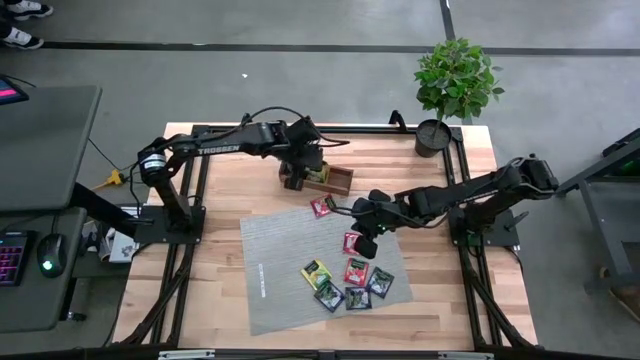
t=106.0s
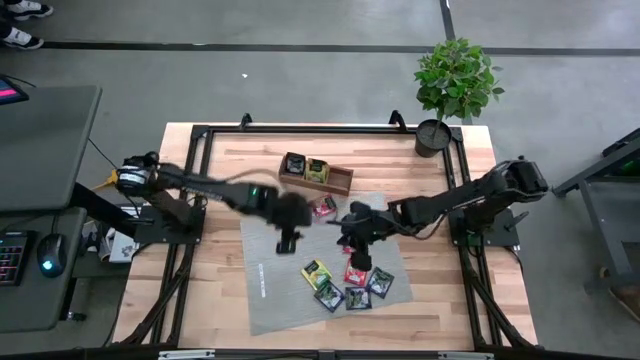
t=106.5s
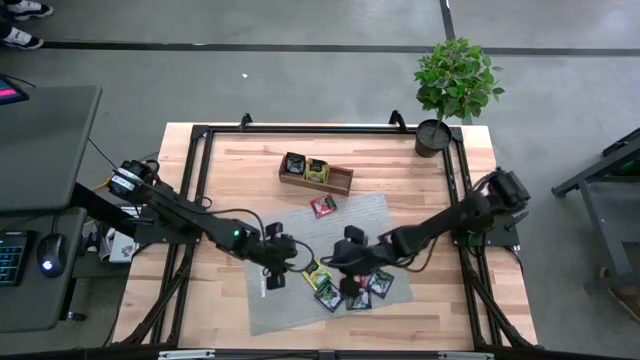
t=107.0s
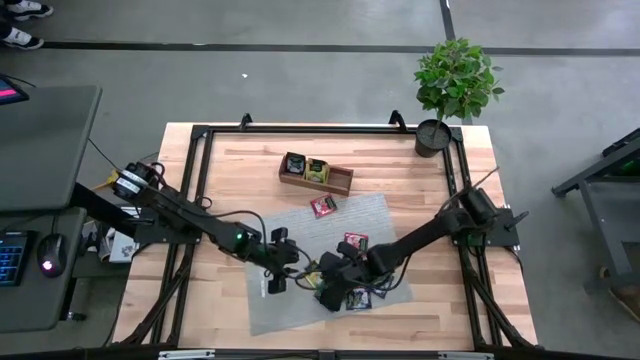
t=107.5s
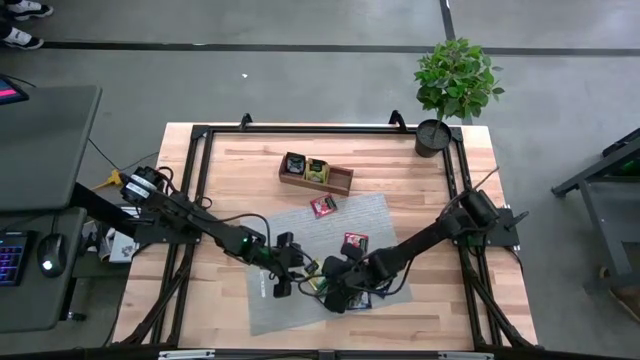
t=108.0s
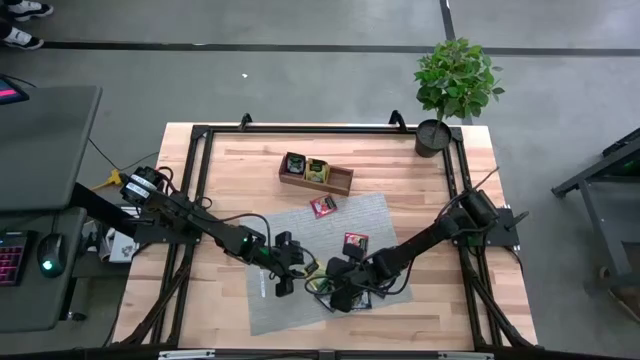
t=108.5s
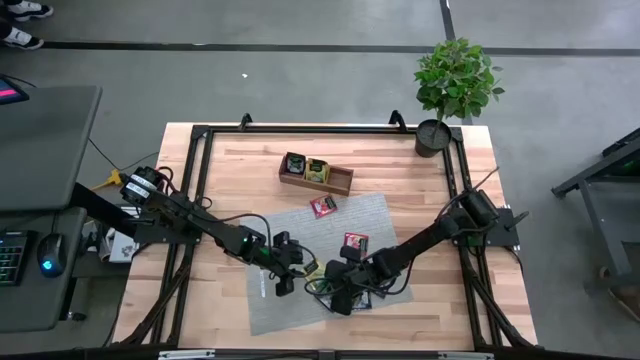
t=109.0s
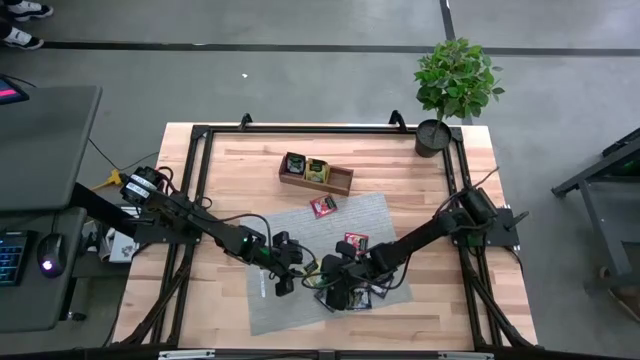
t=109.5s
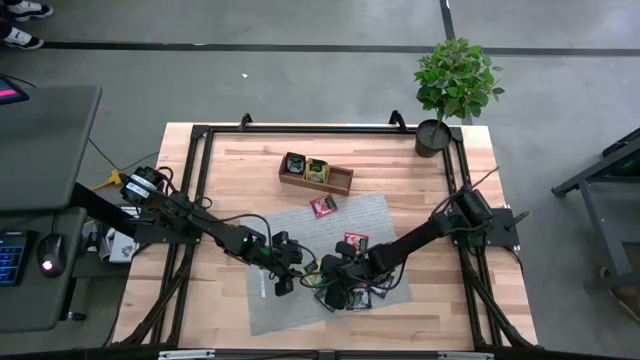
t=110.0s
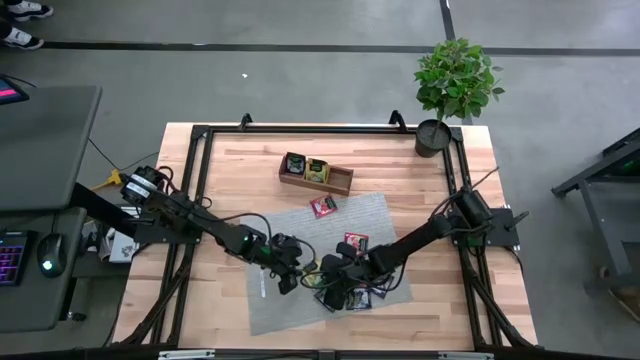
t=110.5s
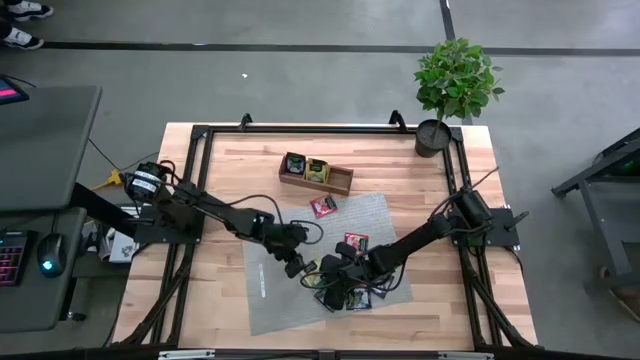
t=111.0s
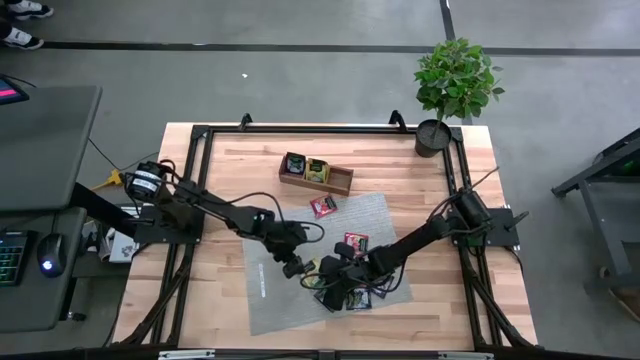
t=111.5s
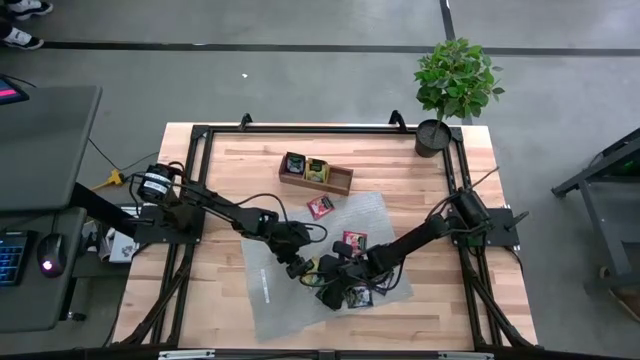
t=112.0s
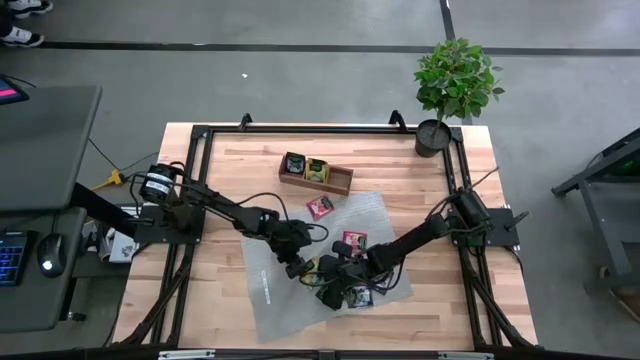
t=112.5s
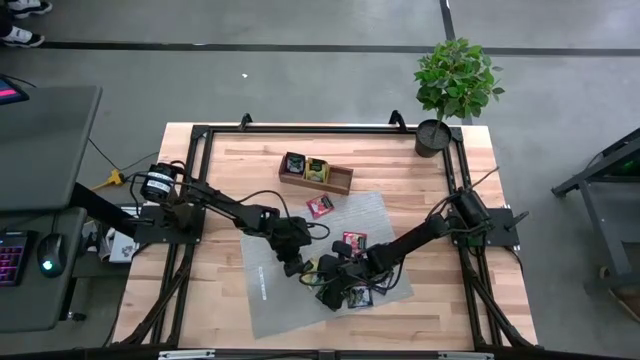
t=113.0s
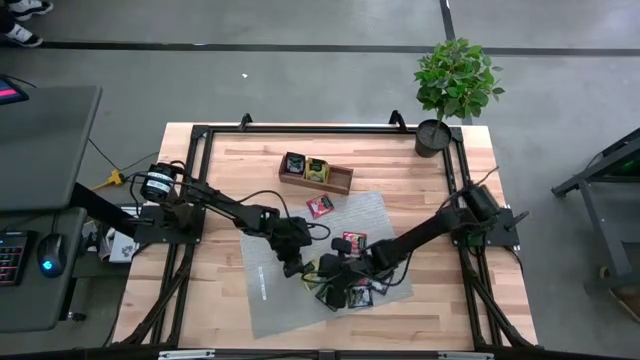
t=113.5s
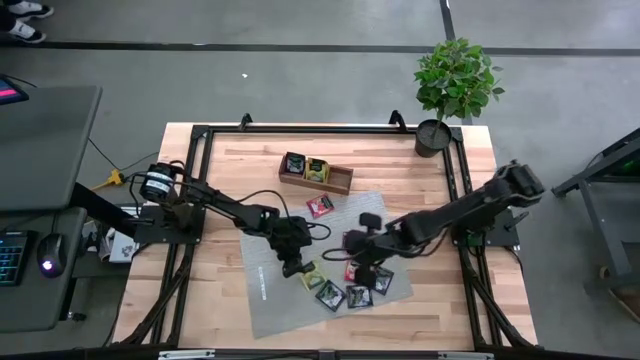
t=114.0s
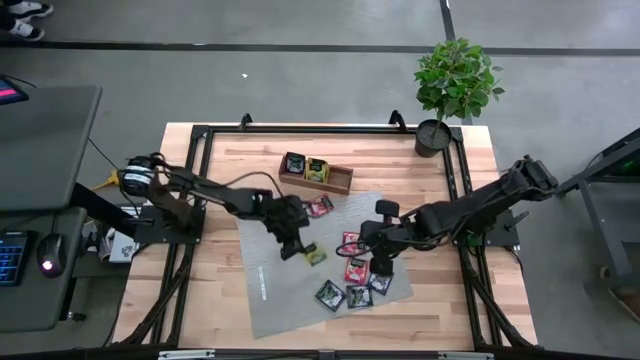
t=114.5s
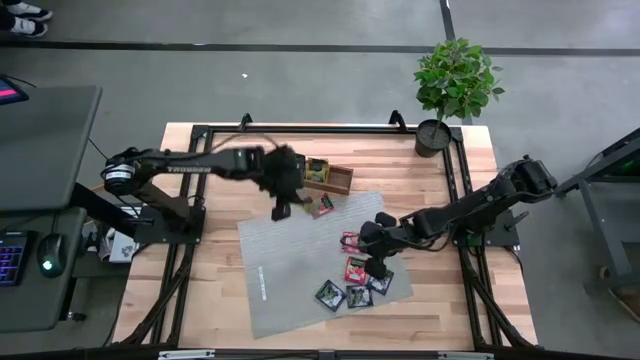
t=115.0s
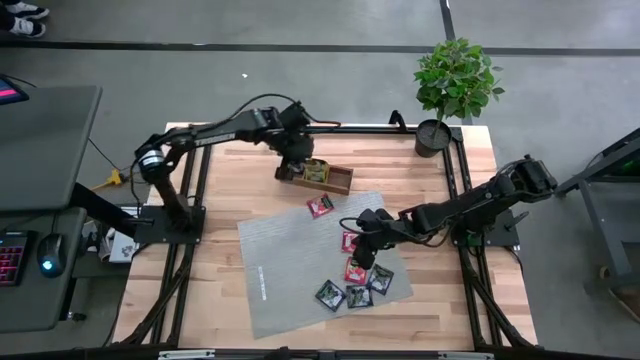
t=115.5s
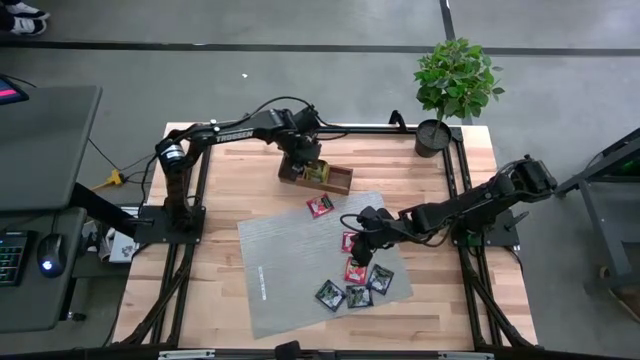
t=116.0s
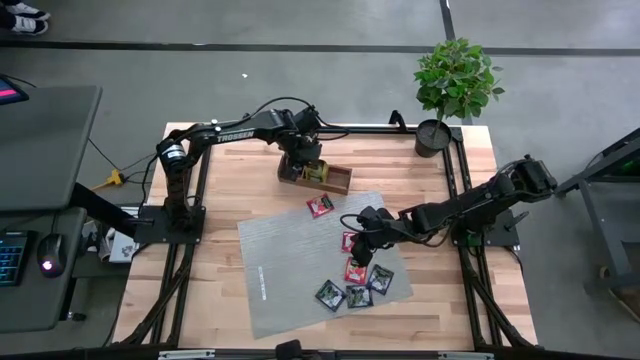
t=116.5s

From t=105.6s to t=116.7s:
Task: Pick & Place Tea
Put the yellow tea bag into the middle section of the wooden organizer

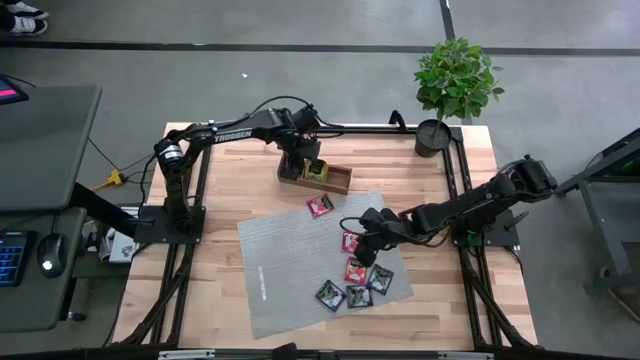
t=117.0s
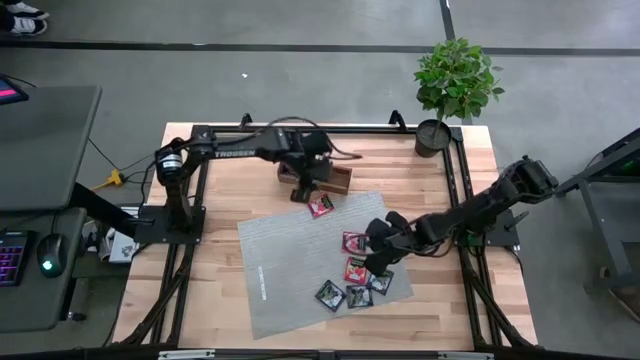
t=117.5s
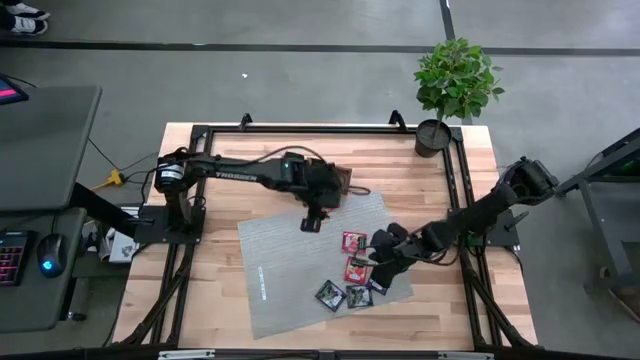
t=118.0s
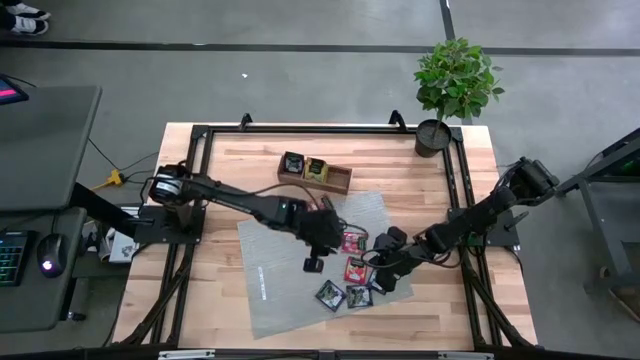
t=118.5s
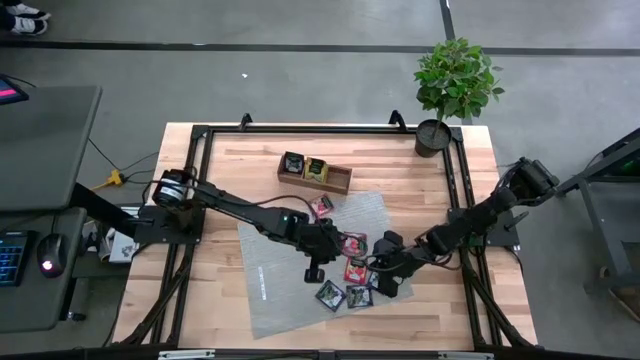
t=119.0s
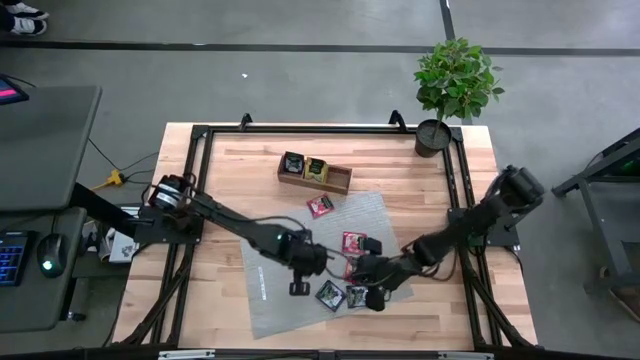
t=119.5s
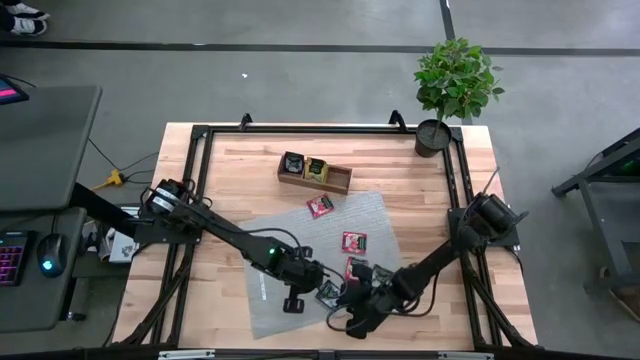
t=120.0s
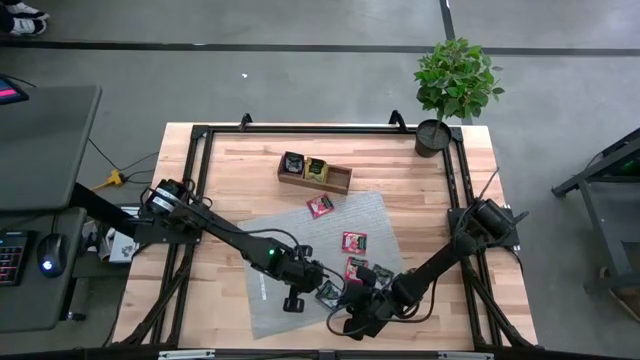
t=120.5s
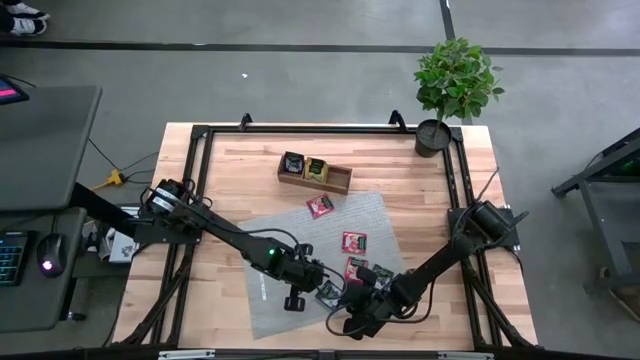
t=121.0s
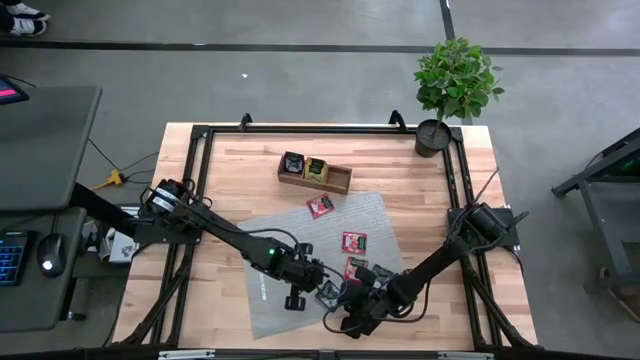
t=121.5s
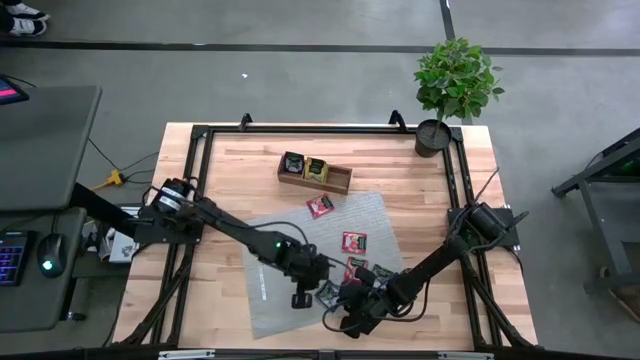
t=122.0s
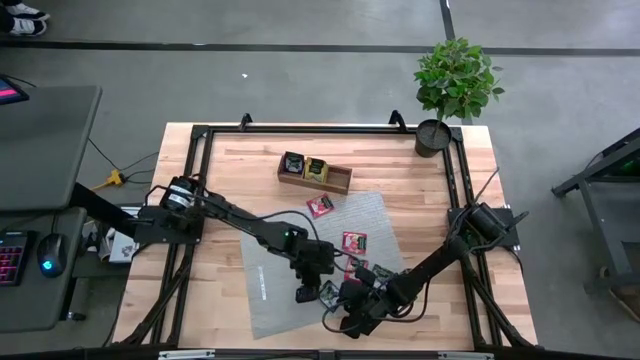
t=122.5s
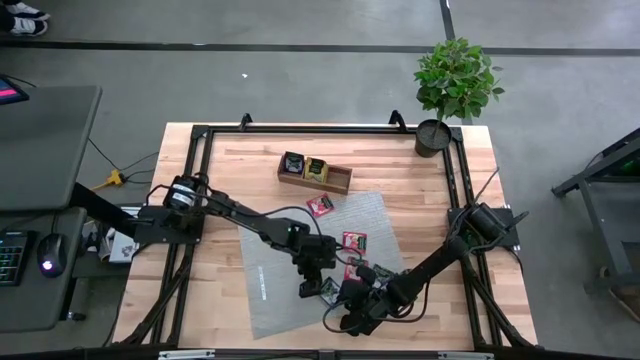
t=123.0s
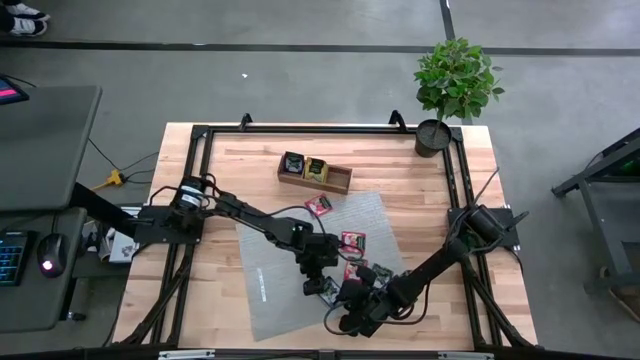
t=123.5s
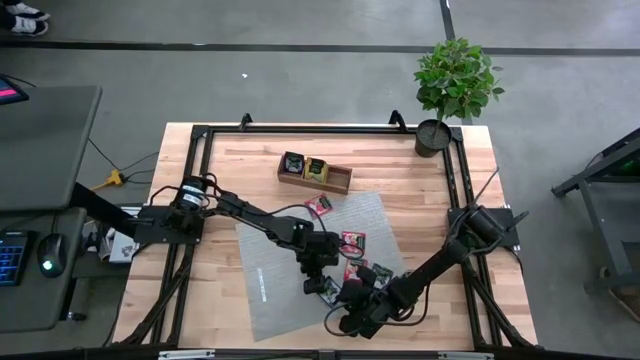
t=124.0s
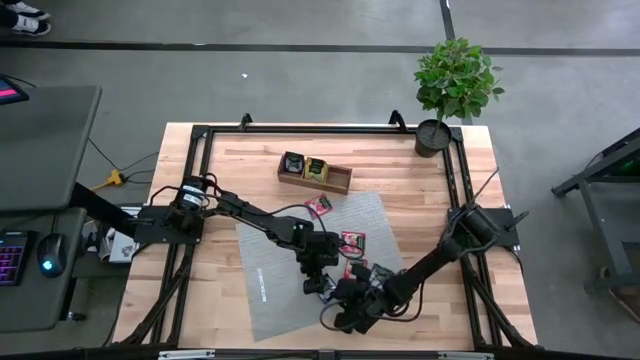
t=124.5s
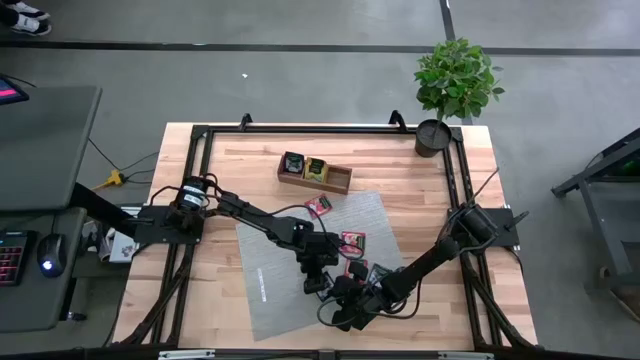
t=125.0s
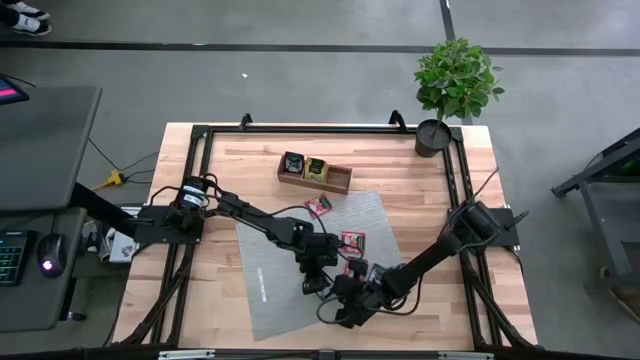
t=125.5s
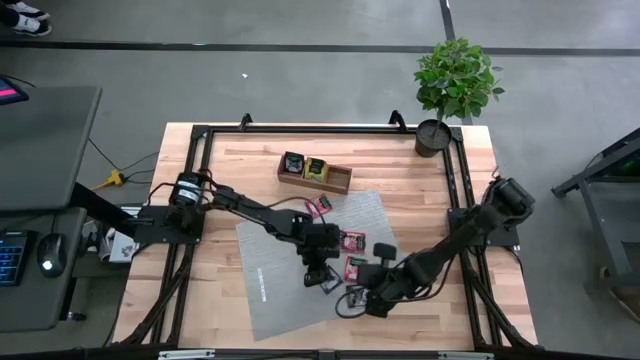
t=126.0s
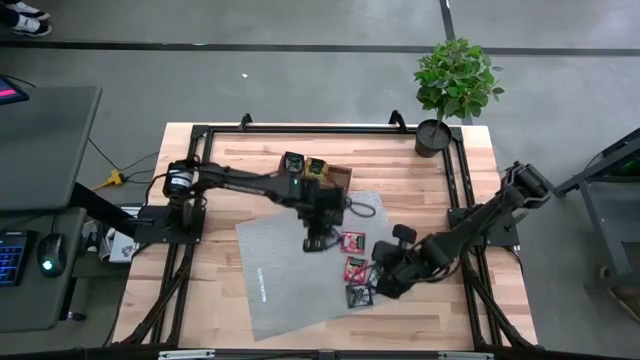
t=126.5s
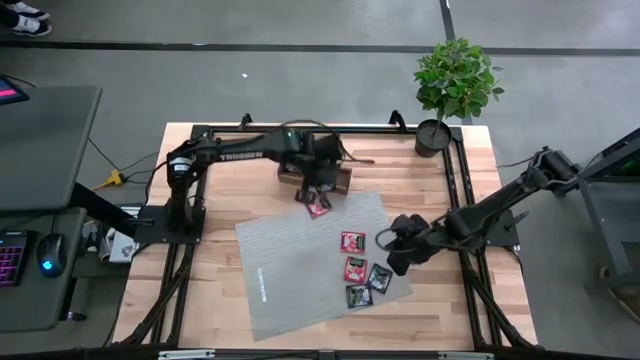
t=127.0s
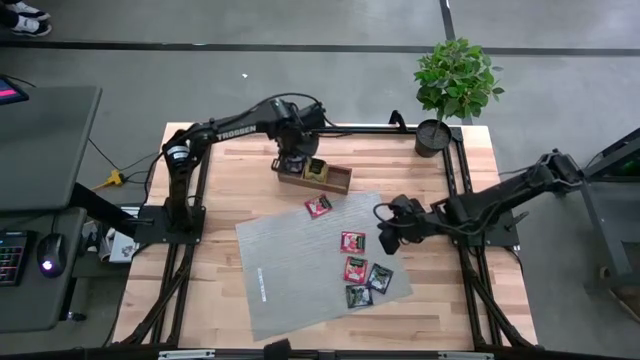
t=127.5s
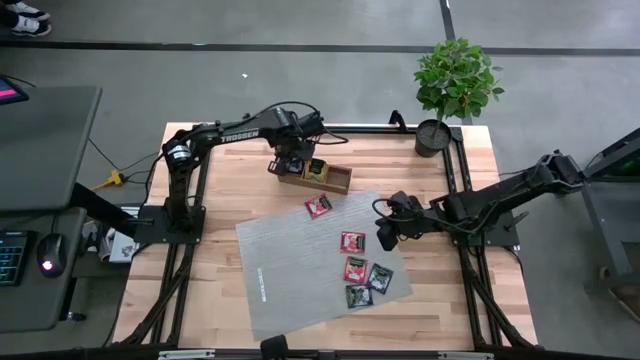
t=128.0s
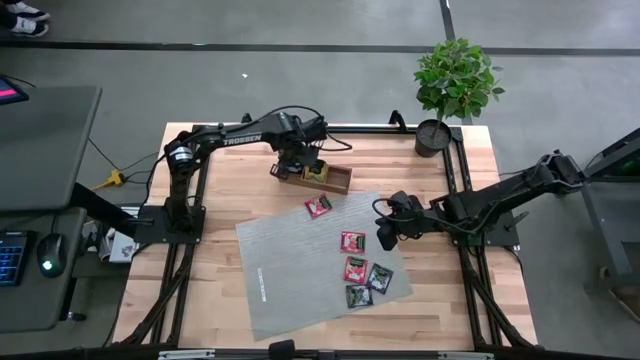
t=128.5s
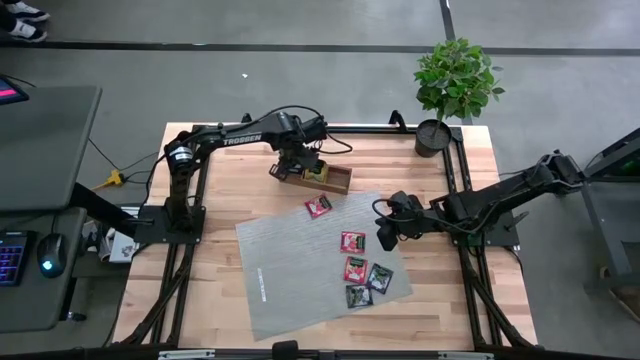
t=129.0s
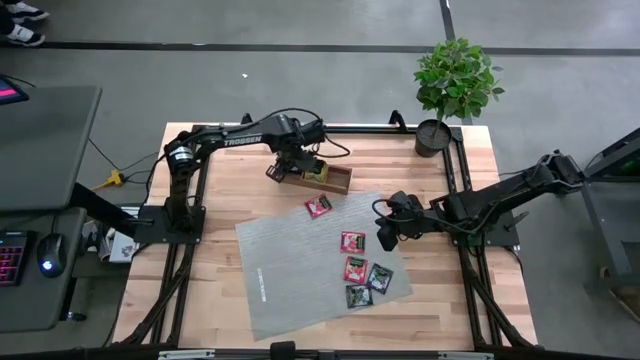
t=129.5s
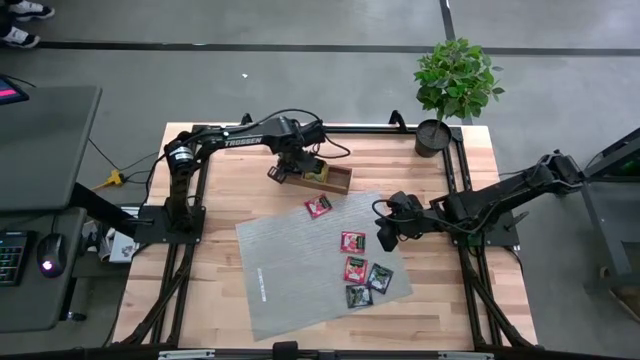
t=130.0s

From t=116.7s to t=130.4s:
Put the purple tea bag into the left section of the wooden organizer
